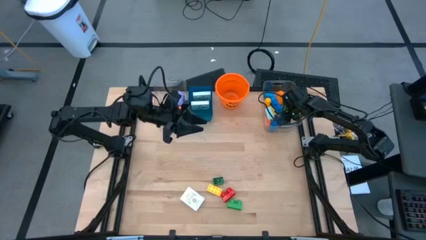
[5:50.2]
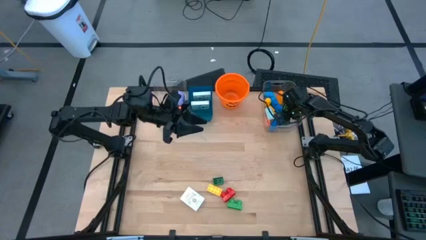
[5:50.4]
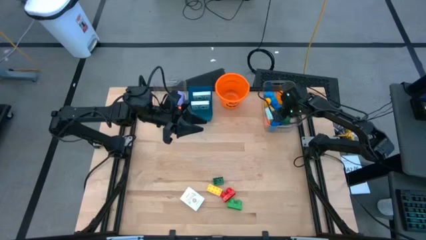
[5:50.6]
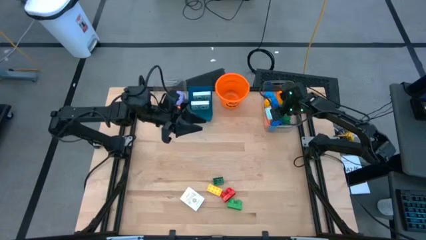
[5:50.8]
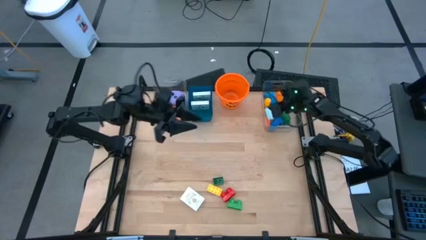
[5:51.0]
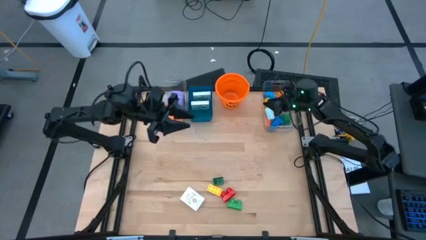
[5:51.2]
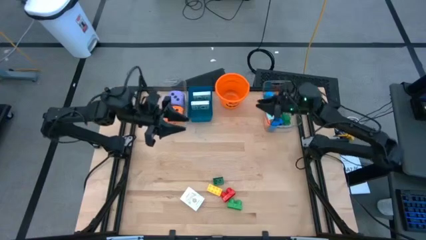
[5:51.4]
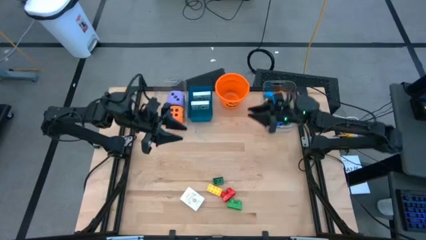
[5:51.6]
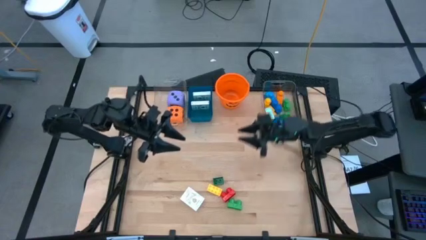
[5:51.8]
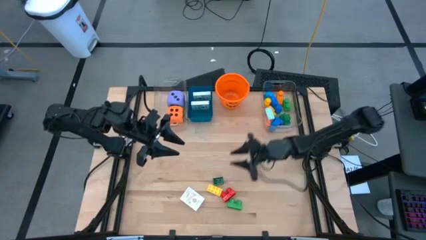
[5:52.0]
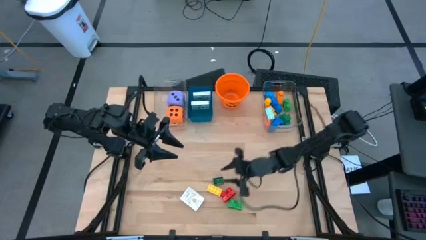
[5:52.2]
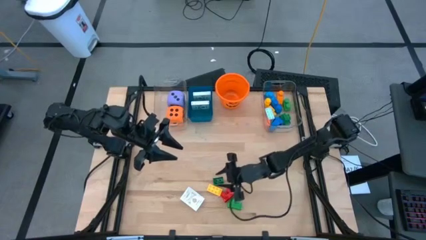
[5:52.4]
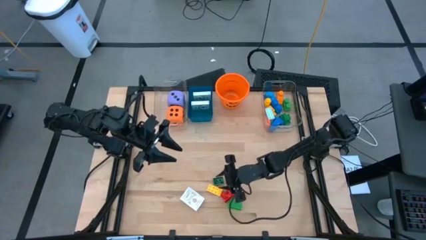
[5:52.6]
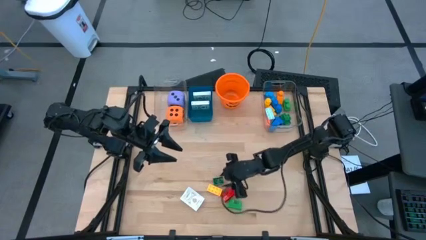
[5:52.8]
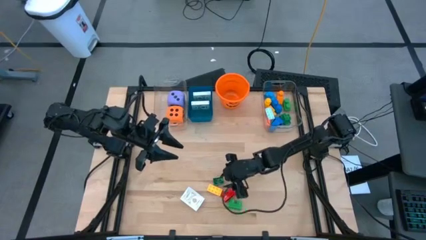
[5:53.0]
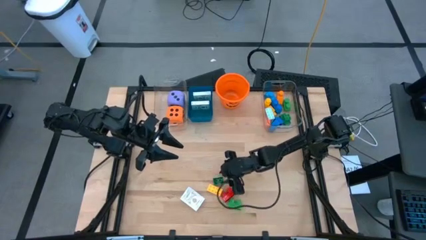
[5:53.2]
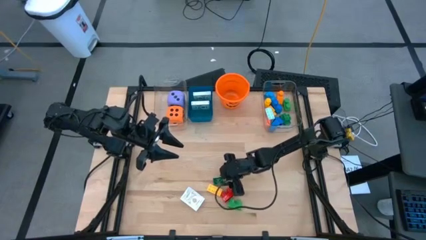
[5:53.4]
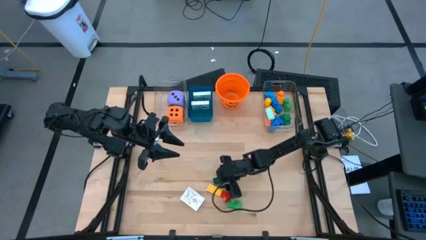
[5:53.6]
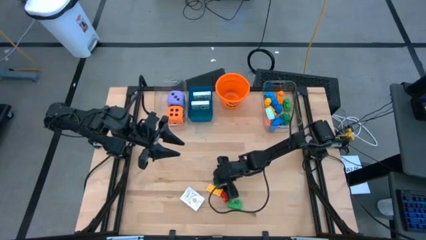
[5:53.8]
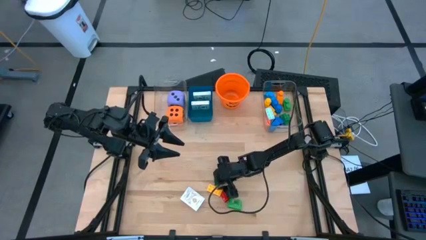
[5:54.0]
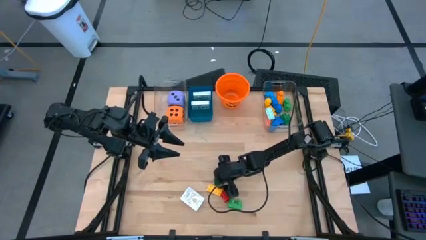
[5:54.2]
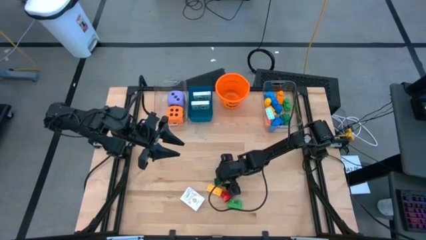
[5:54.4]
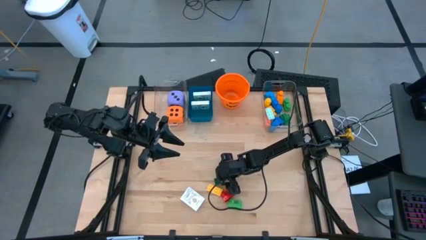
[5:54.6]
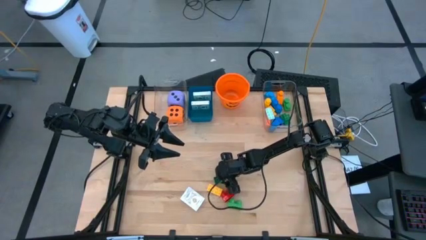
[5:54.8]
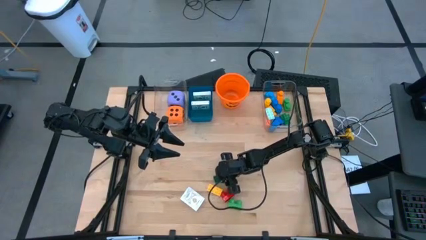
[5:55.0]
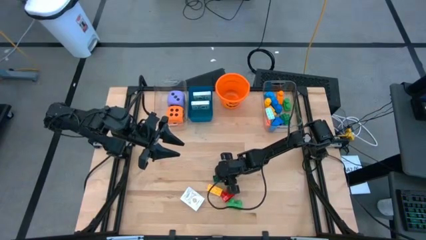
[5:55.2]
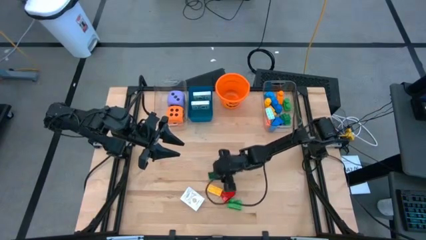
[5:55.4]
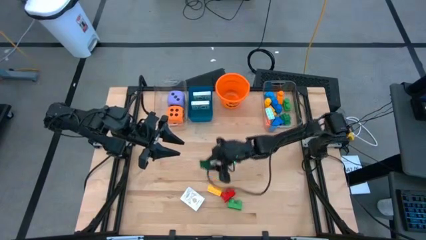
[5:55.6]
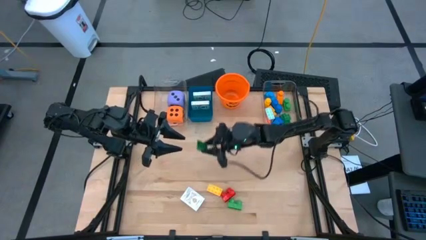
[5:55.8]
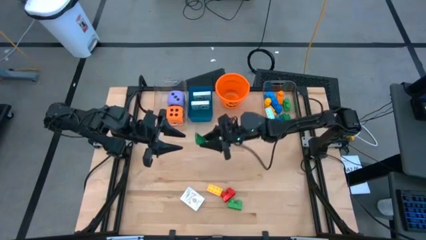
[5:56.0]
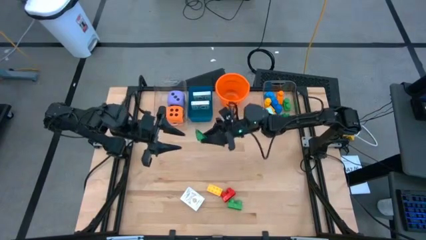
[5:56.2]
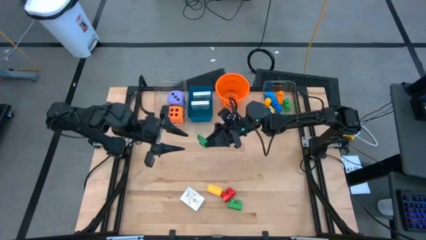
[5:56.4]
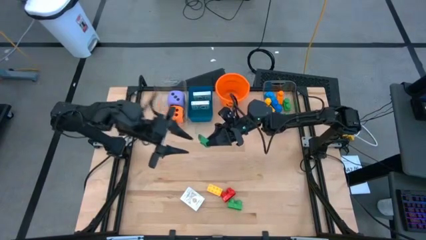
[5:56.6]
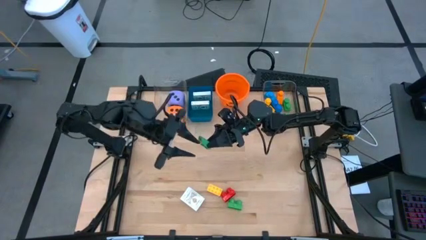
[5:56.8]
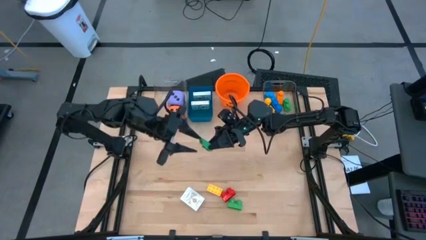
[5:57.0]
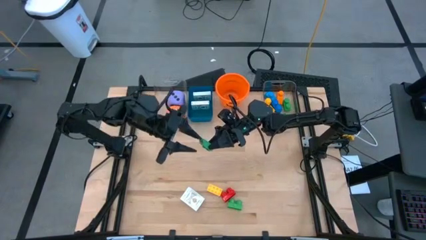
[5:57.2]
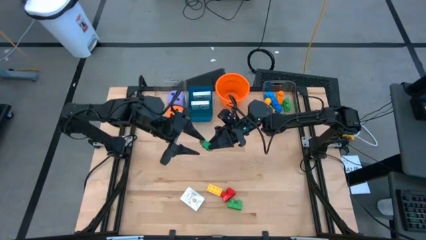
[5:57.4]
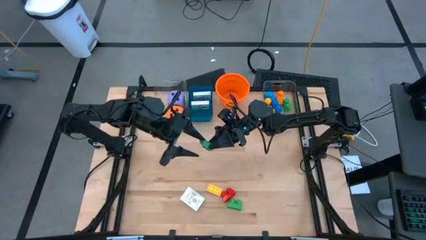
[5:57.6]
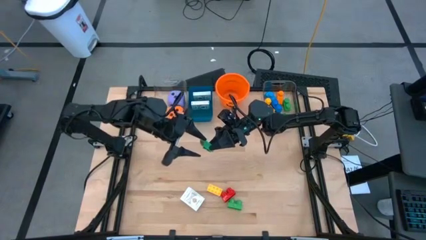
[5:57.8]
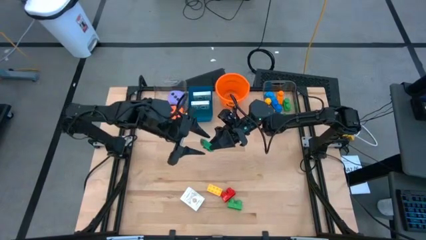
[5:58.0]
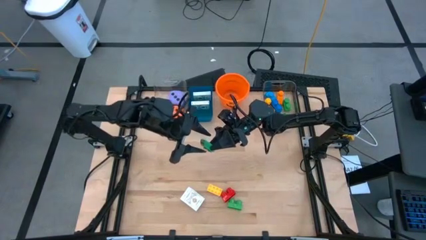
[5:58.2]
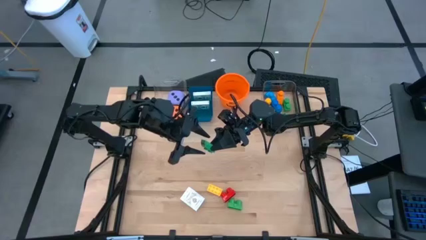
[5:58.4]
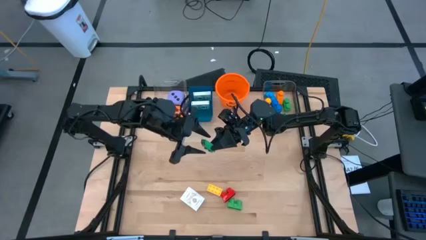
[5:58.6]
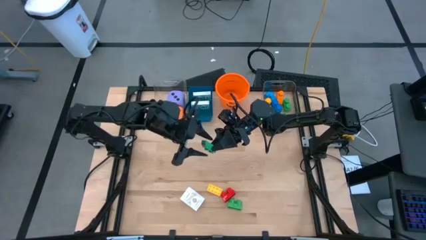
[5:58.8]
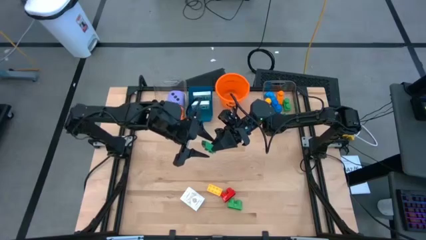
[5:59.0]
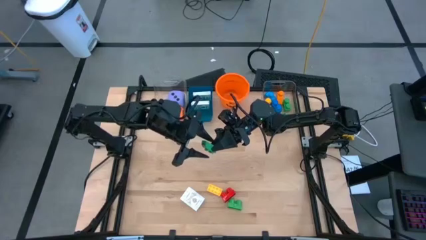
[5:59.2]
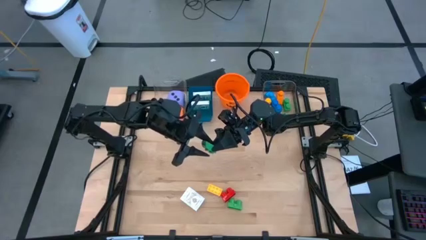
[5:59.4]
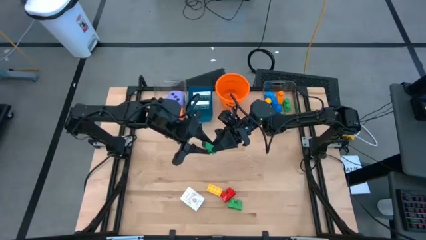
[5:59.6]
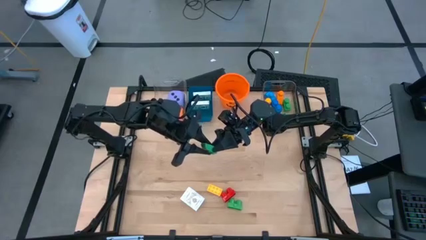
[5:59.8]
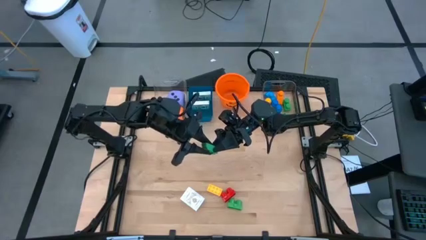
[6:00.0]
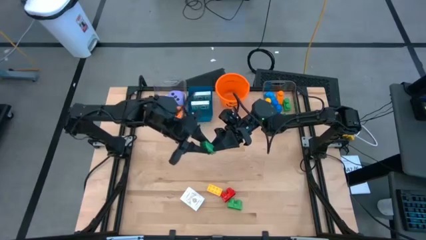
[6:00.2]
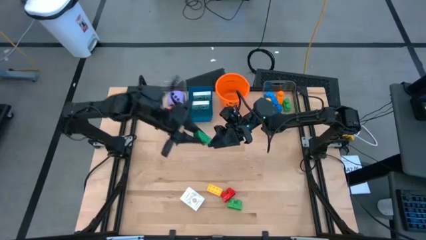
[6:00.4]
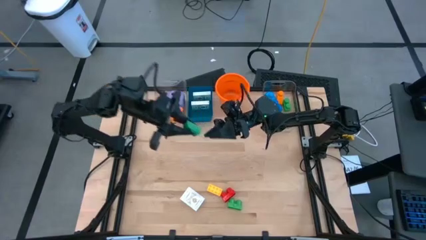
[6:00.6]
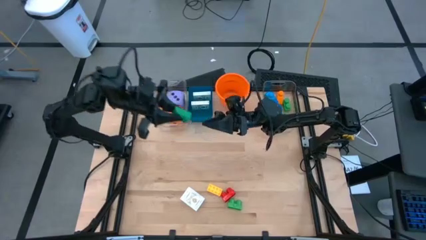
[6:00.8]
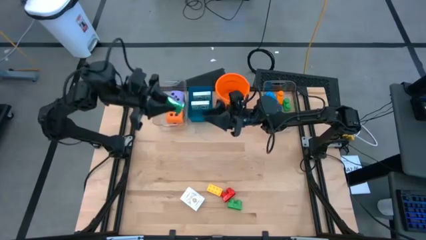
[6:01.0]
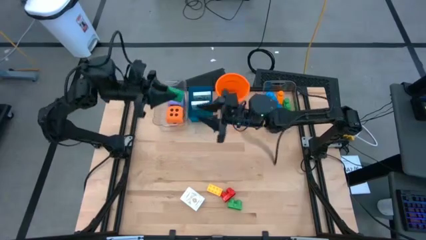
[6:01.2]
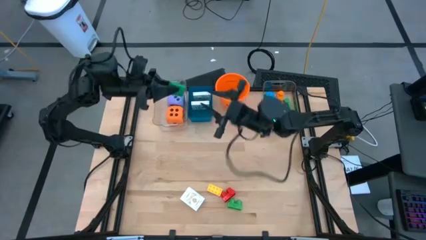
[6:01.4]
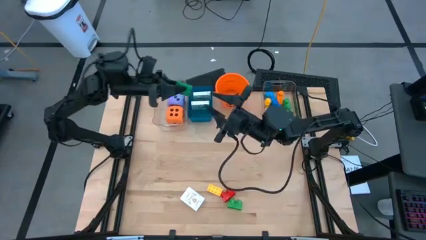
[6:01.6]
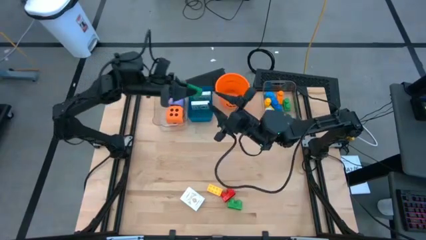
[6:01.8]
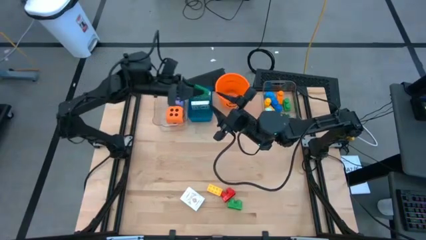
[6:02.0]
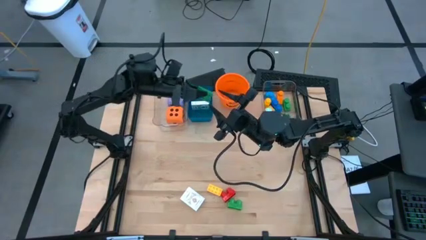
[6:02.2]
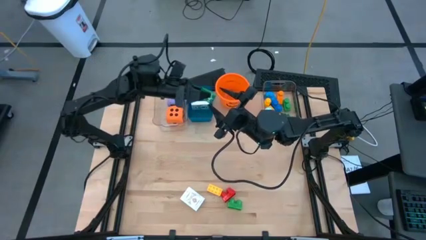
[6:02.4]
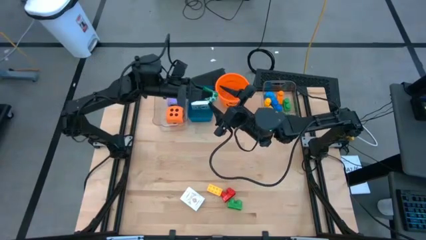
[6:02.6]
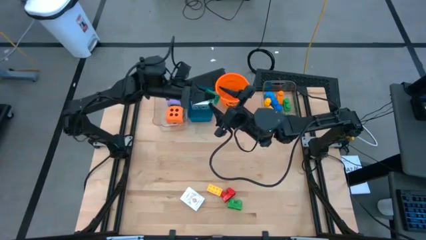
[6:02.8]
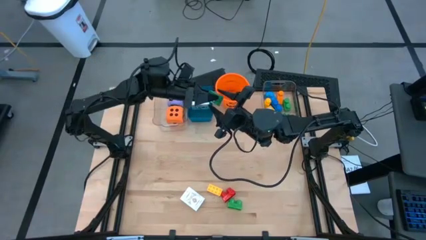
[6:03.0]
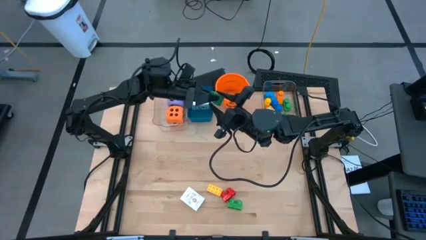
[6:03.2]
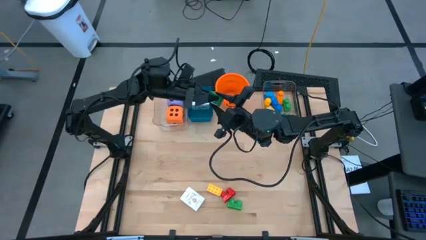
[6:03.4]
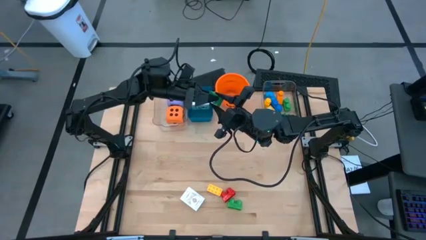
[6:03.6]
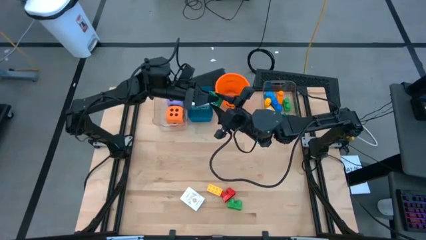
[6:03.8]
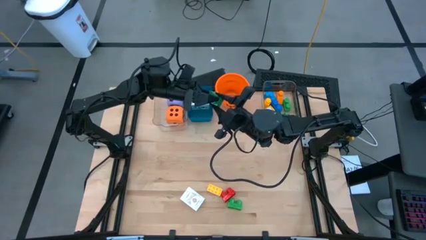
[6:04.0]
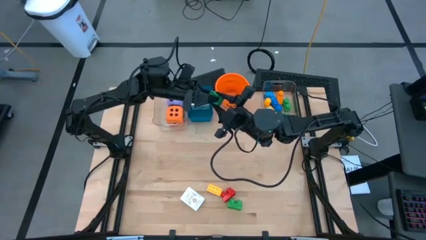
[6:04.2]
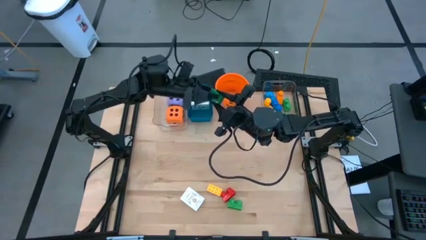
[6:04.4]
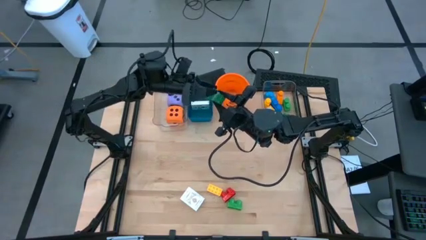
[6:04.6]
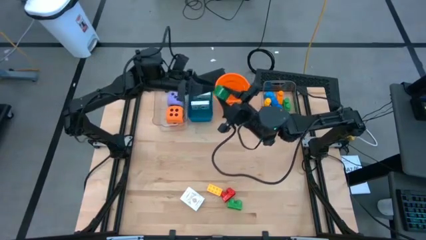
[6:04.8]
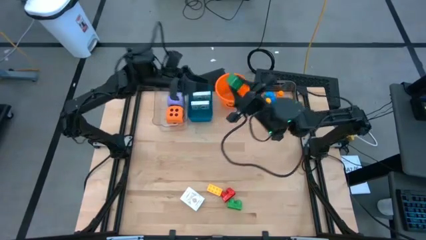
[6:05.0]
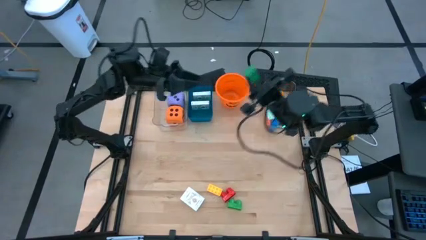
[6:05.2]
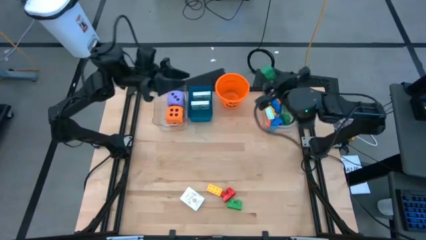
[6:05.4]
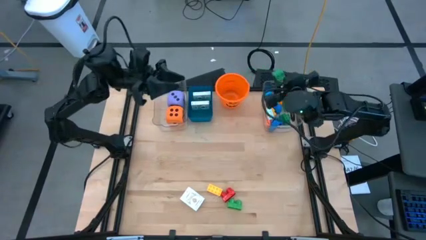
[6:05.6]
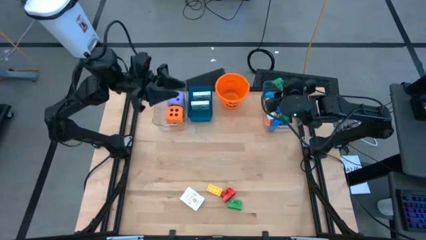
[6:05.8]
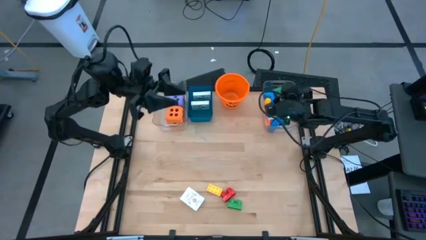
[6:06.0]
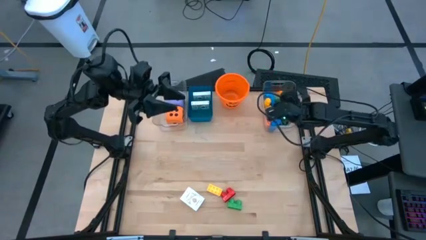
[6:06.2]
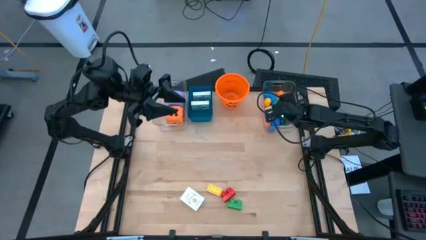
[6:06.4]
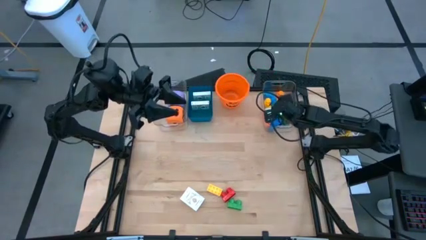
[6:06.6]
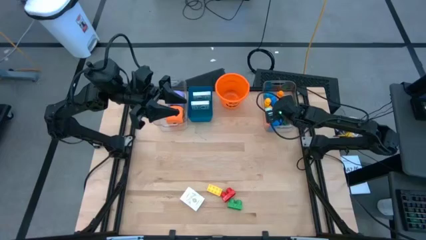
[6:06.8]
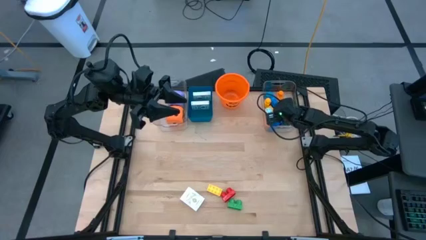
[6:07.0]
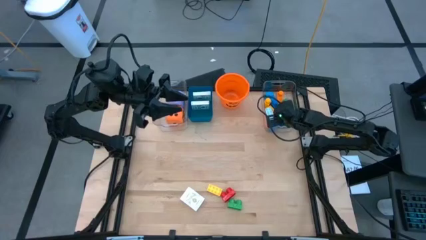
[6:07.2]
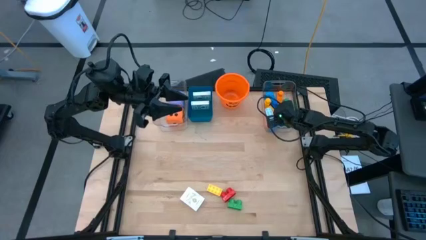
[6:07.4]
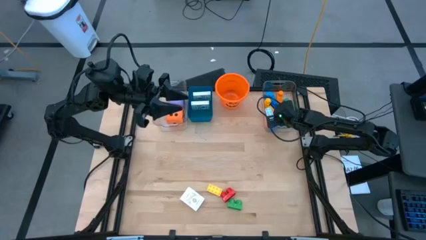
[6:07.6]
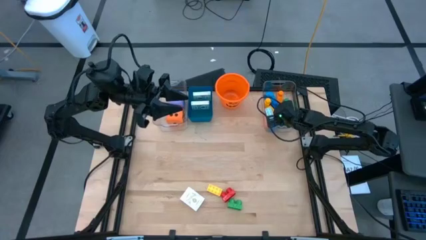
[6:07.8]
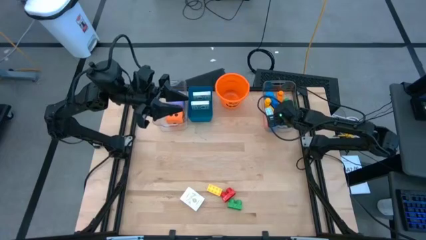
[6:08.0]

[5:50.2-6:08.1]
Task: Pick & Place Toys
Put the green game piece into the right transparent bin
